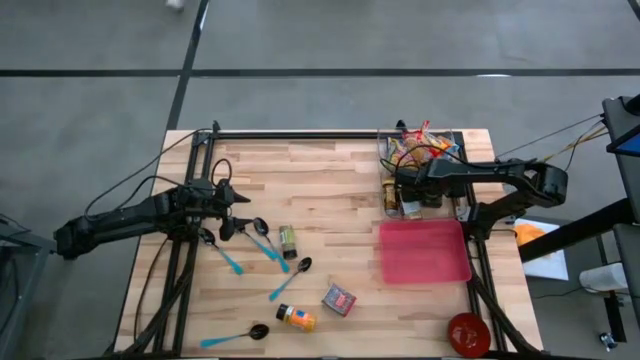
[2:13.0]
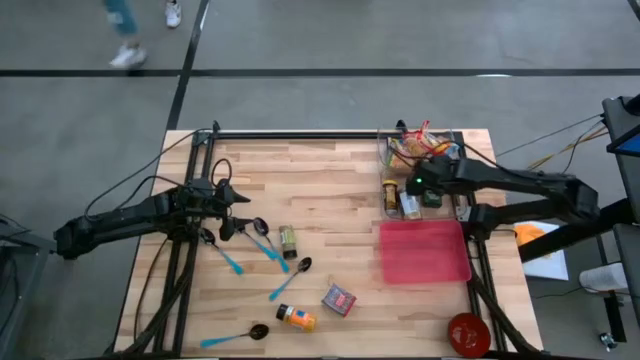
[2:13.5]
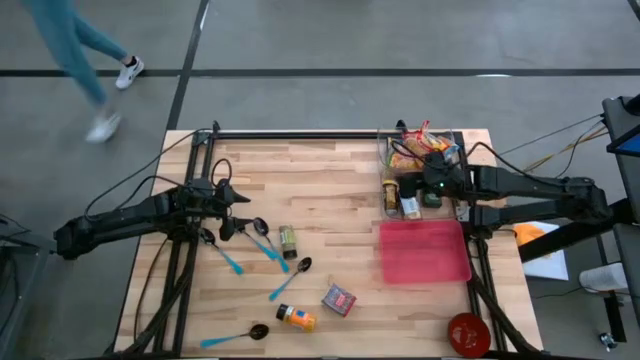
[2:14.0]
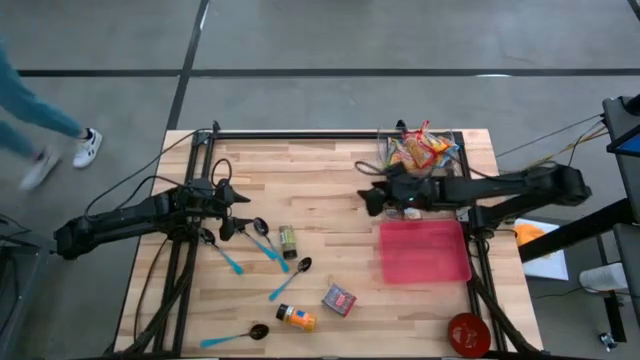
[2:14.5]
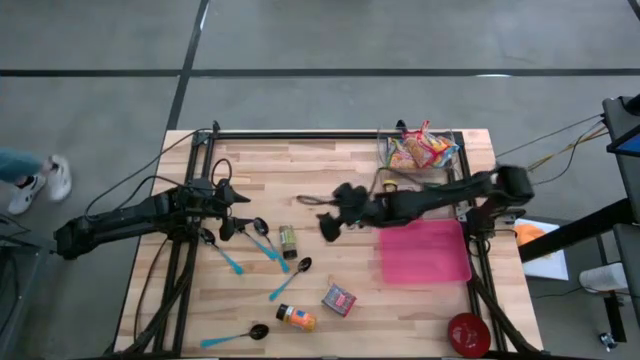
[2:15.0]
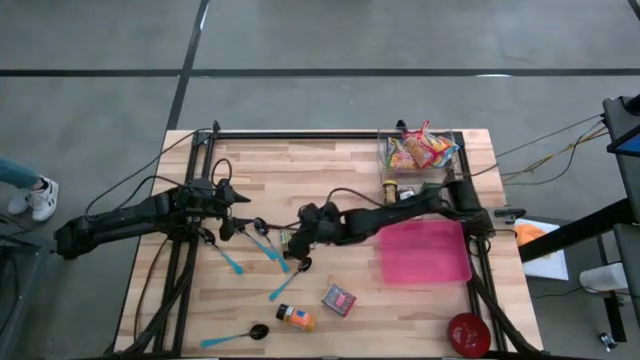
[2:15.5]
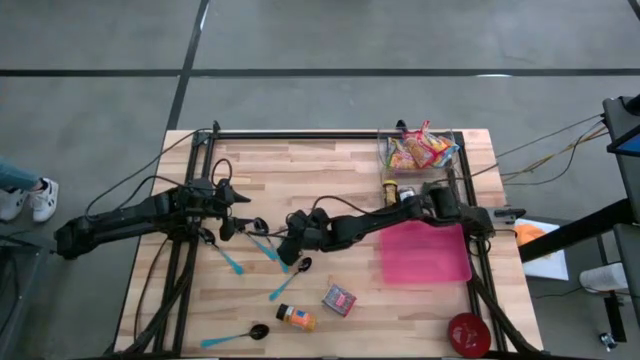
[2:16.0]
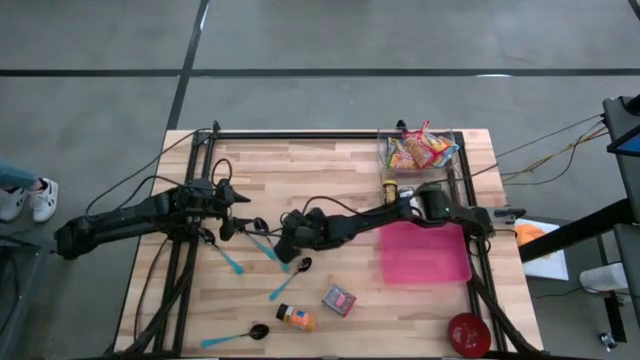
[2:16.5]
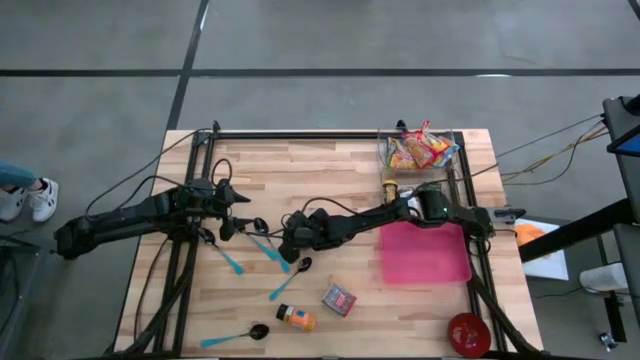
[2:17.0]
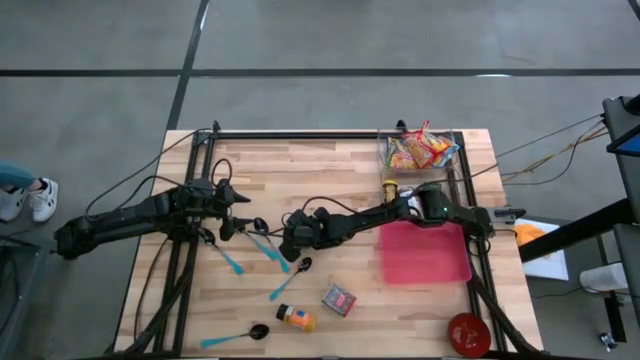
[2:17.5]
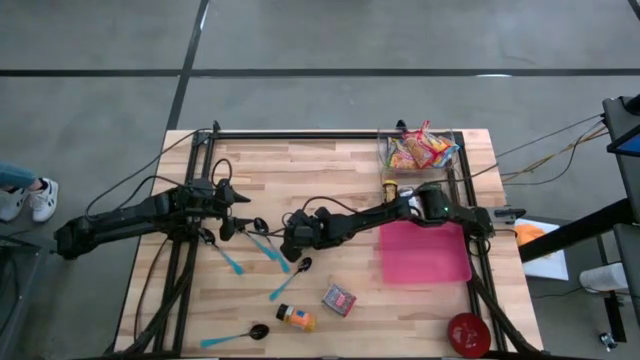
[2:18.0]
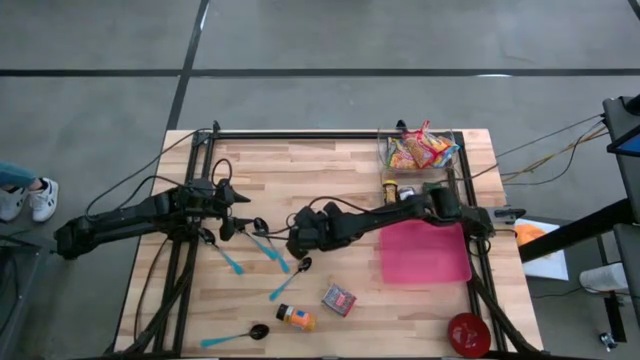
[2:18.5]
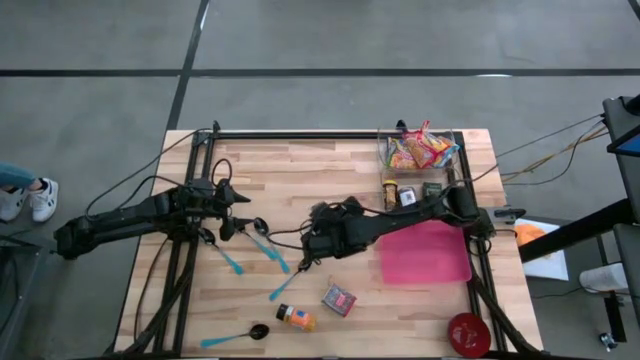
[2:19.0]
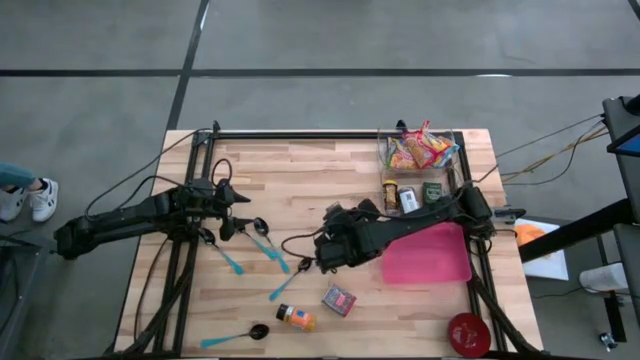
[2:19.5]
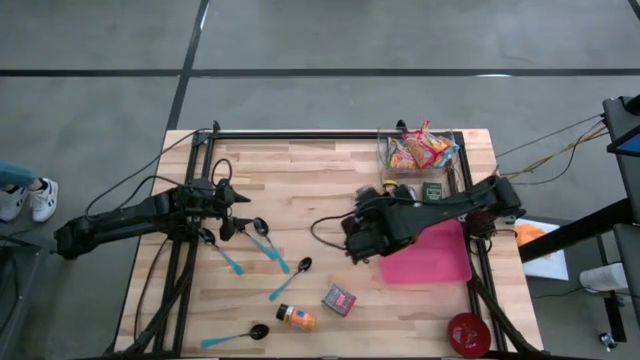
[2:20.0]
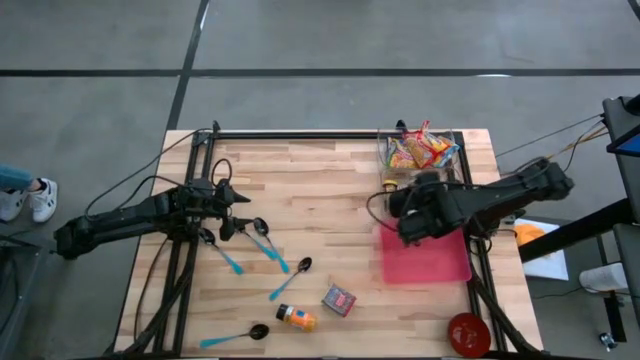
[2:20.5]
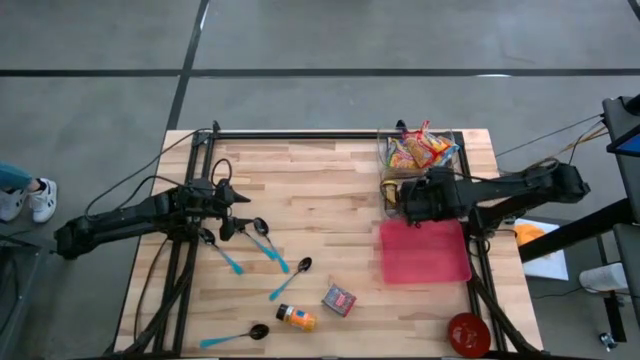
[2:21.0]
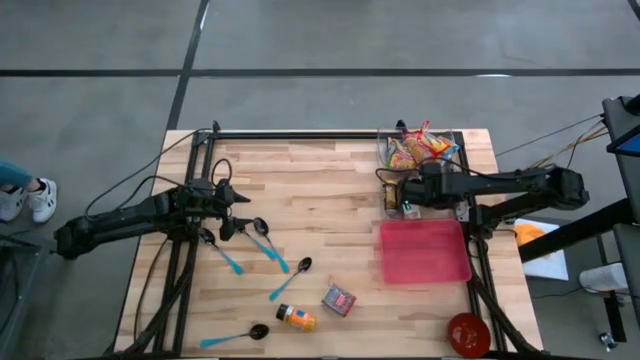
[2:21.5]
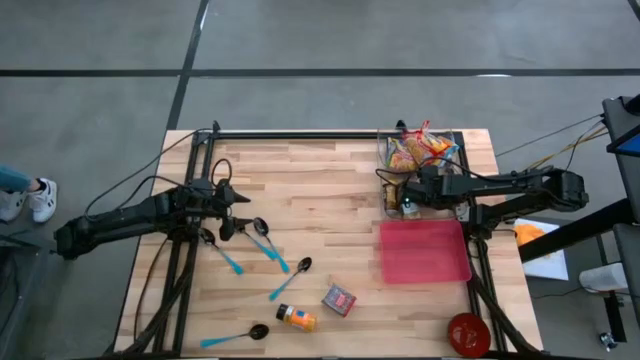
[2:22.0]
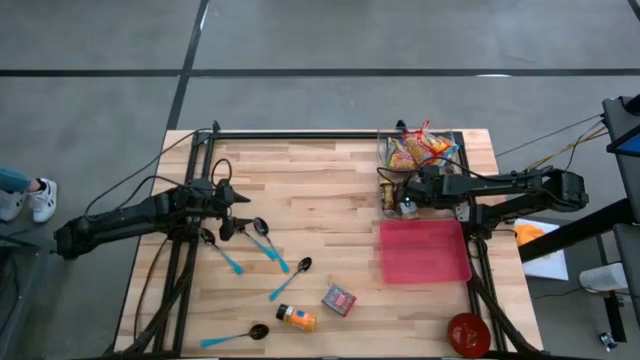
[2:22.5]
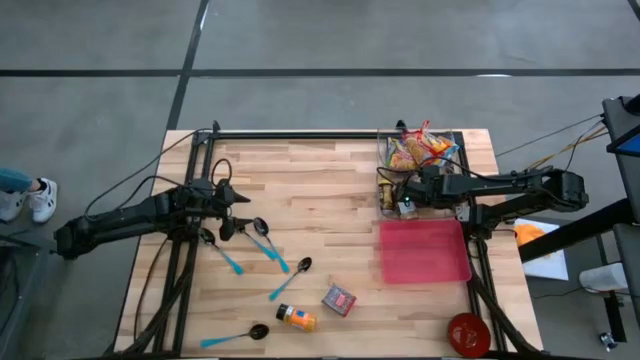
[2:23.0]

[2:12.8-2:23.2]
Put the green seasoning bottle into the bottom transparent bin

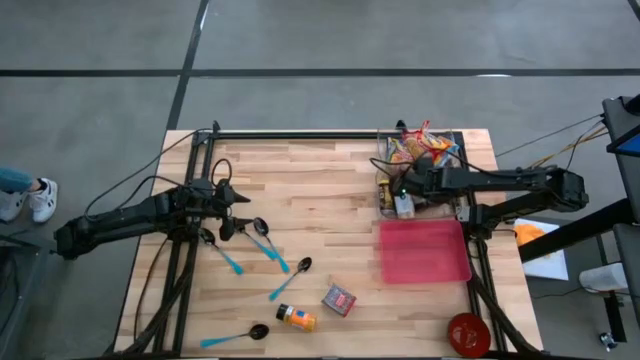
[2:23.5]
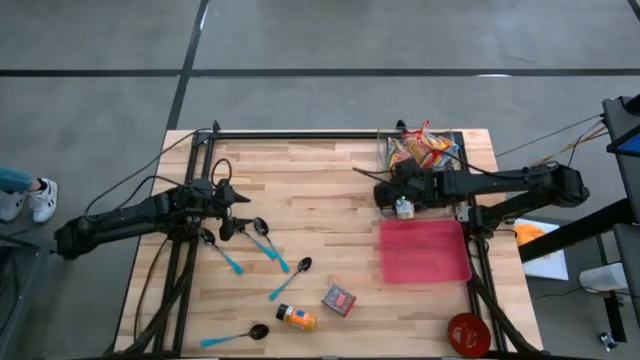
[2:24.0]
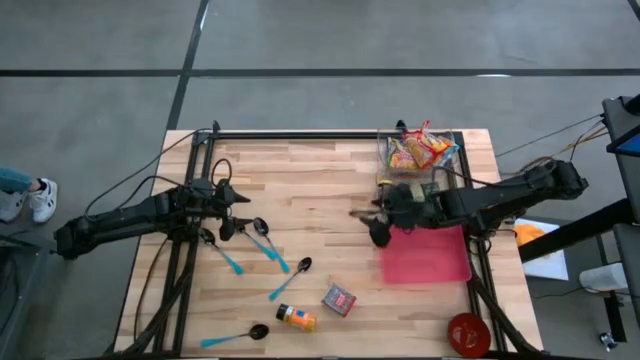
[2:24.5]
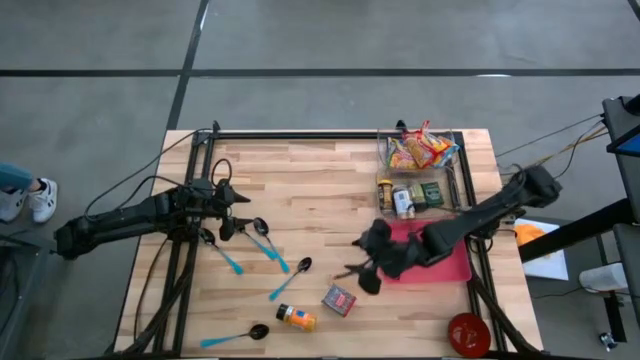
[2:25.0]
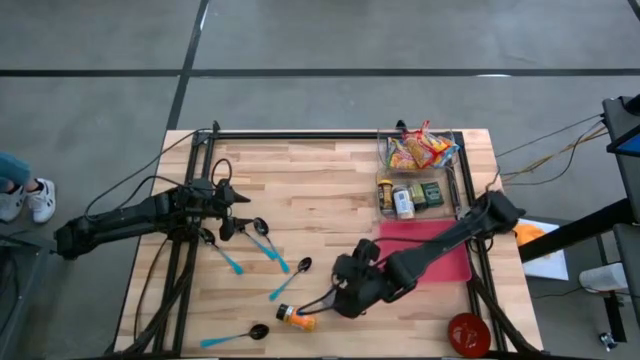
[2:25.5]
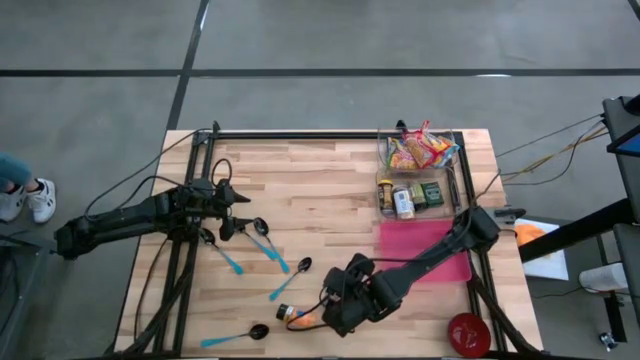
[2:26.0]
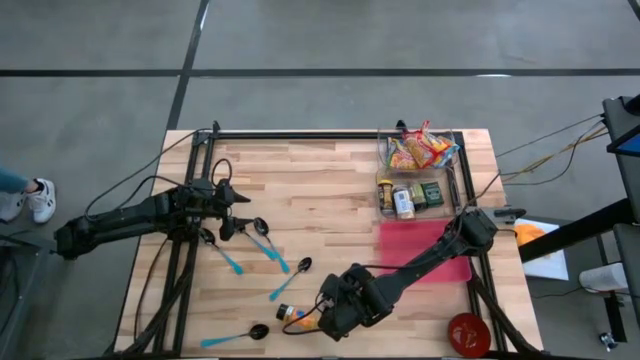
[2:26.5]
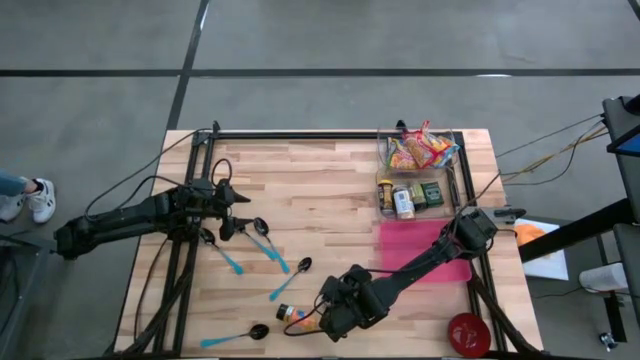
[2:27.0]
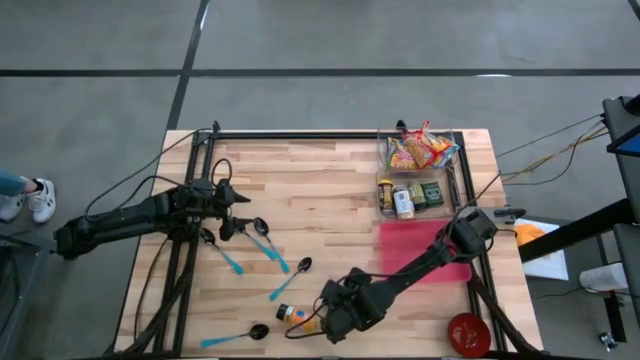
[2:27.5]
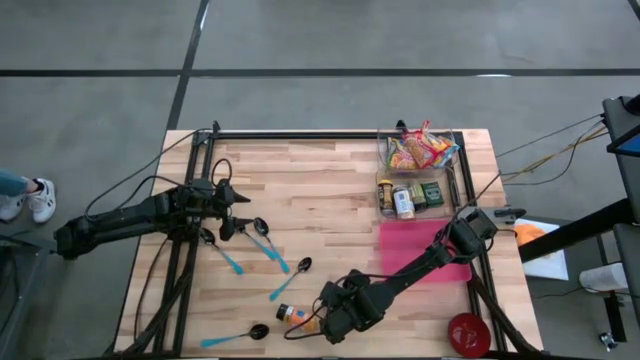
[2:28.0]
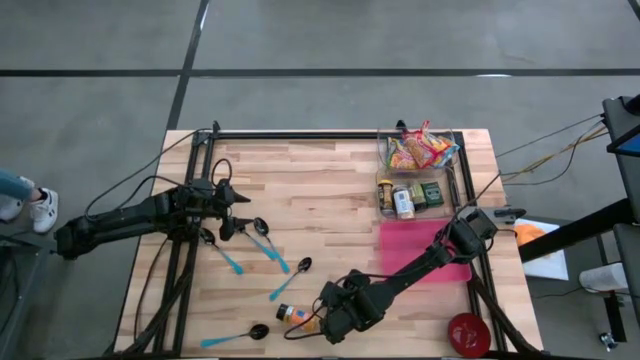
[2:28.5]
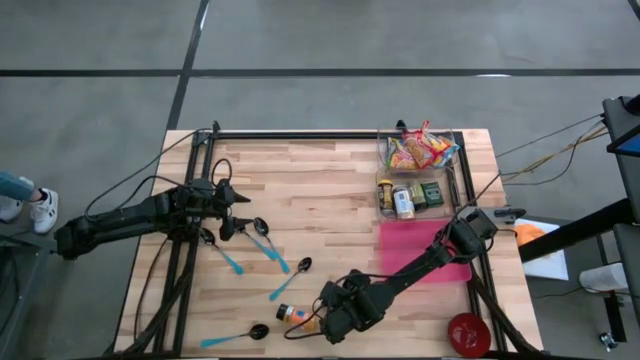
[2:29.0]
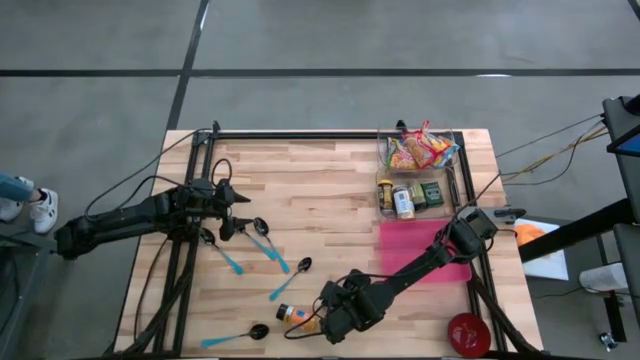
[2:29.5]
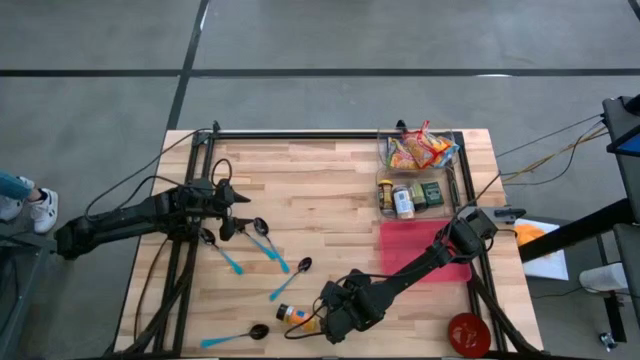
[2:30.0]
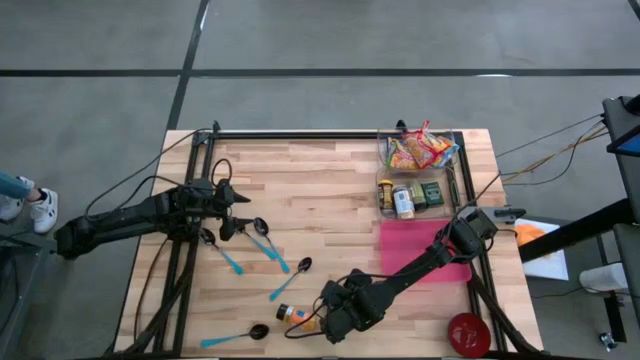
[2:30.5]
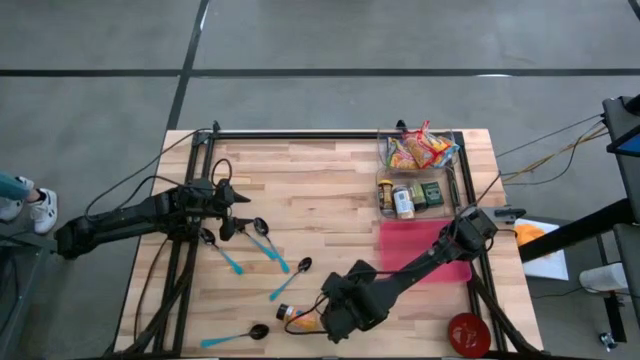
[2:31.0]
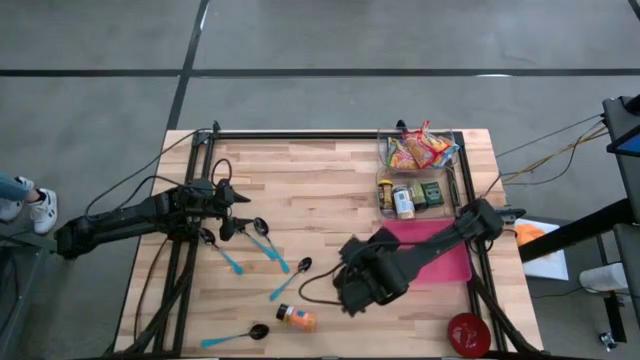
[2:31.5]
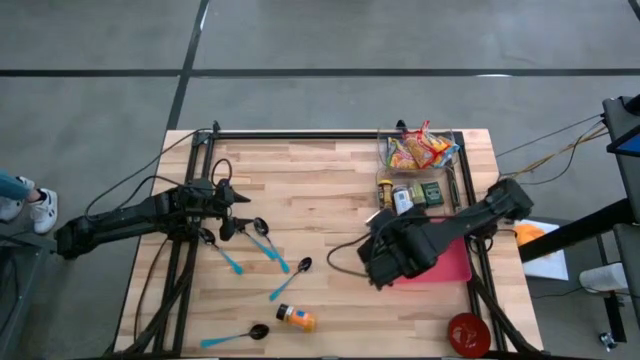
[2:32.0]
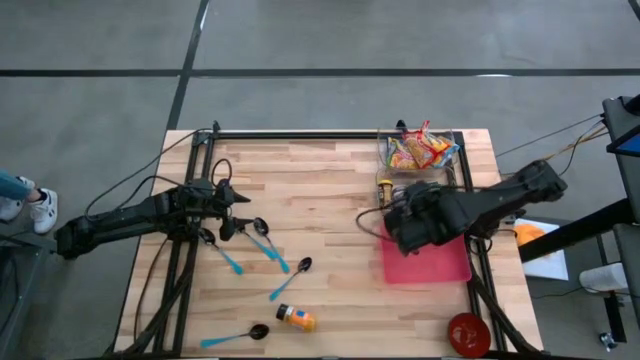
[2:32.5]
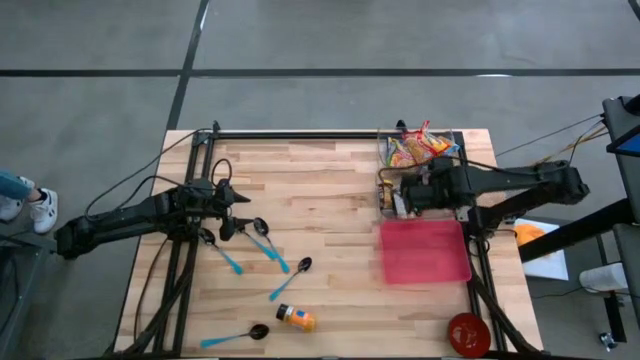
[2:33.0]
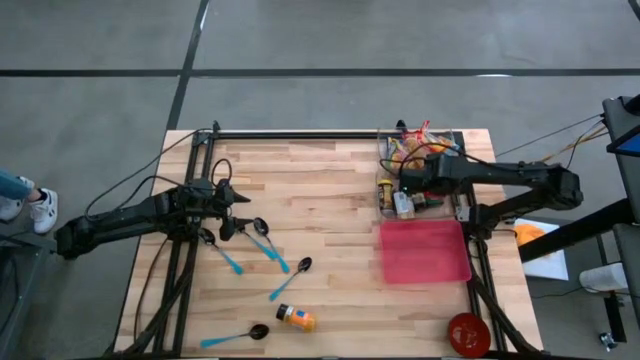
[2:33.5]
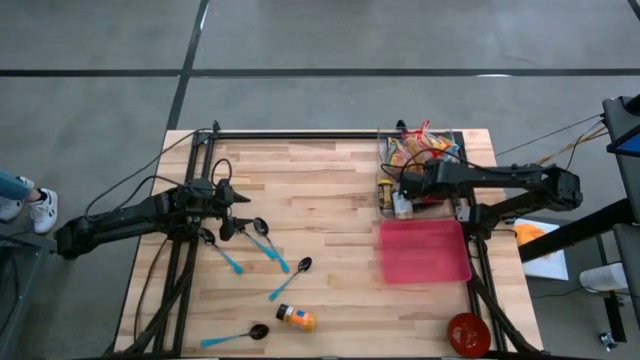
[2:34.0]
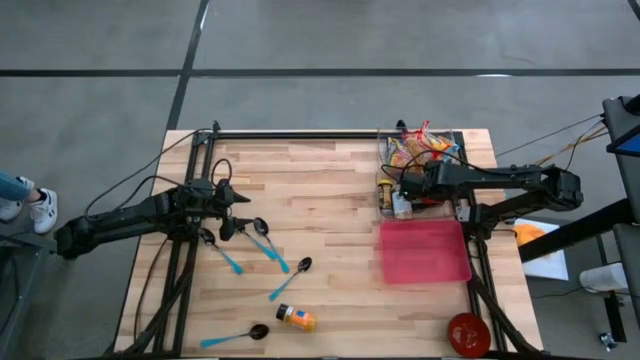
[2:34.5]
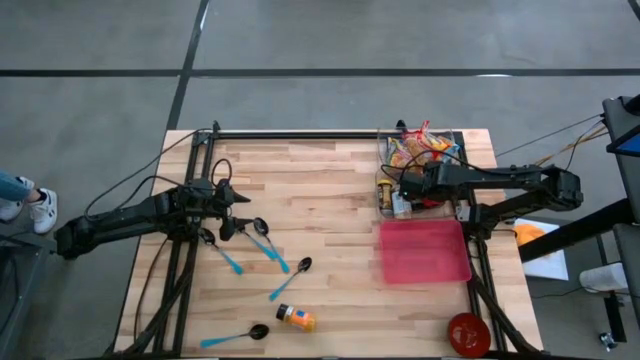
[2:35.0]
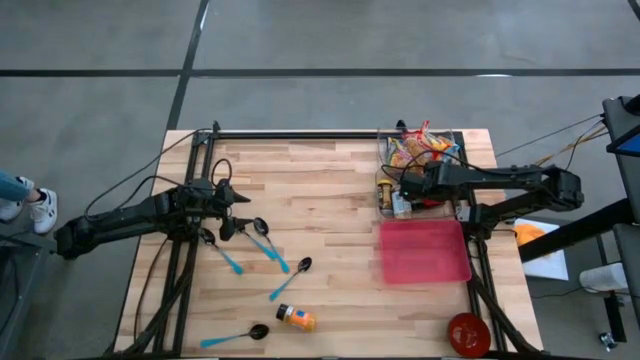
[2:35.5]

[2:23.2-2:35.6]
Put the red seasoning can into the bottom transparent bin
